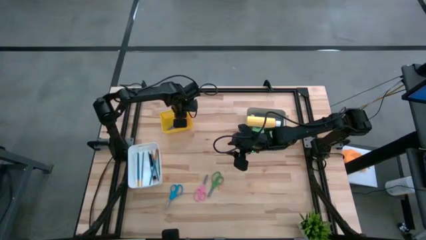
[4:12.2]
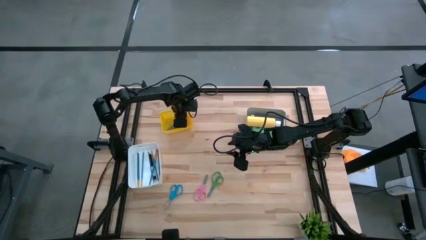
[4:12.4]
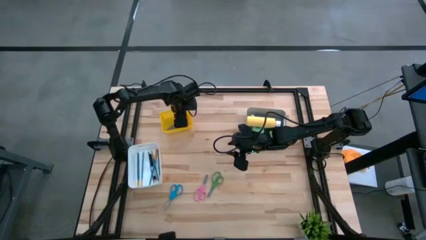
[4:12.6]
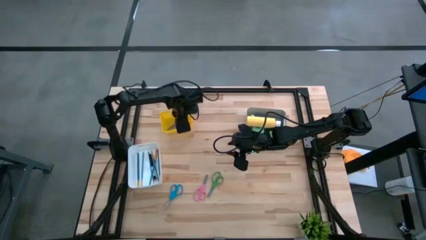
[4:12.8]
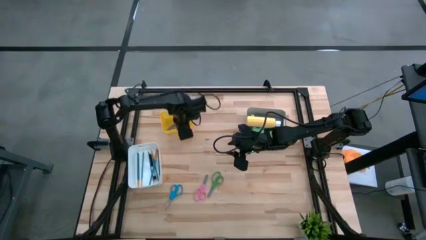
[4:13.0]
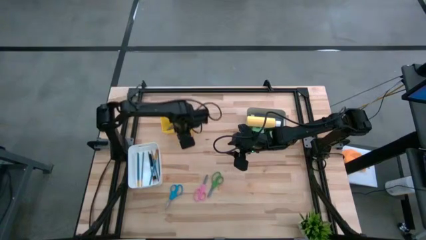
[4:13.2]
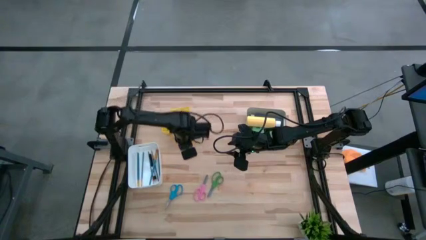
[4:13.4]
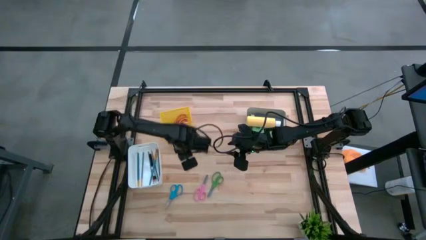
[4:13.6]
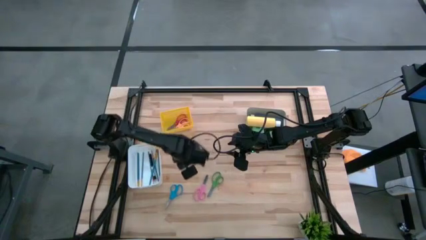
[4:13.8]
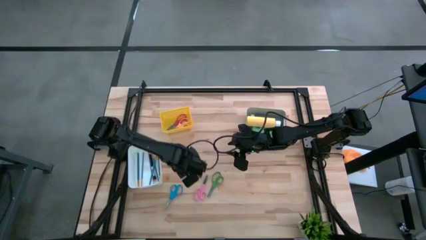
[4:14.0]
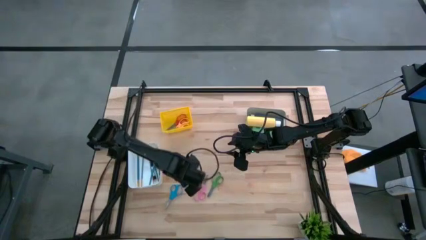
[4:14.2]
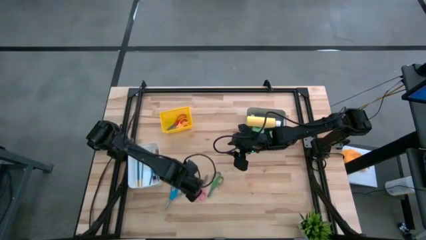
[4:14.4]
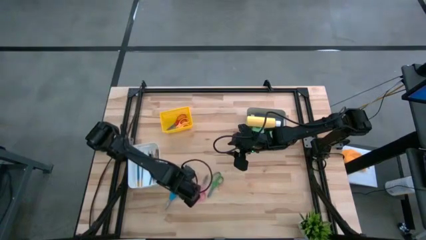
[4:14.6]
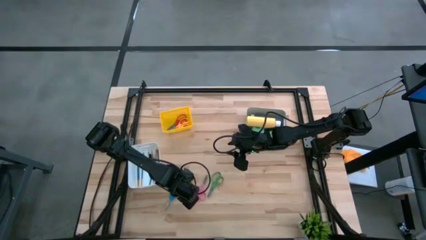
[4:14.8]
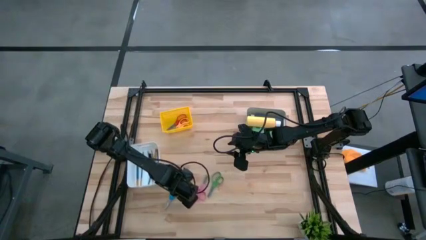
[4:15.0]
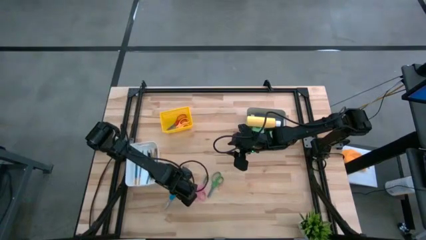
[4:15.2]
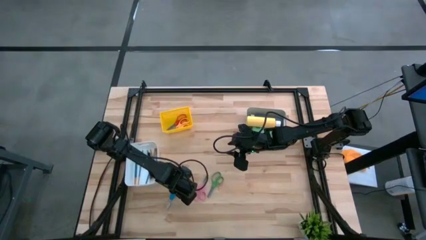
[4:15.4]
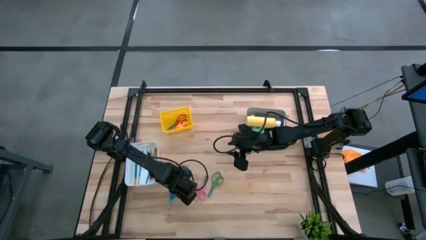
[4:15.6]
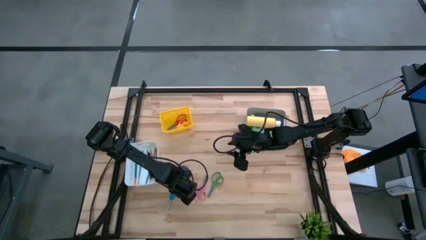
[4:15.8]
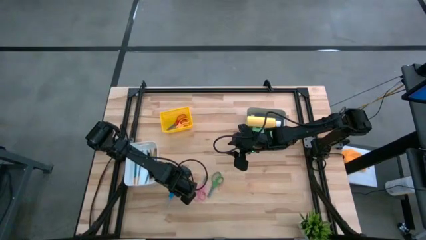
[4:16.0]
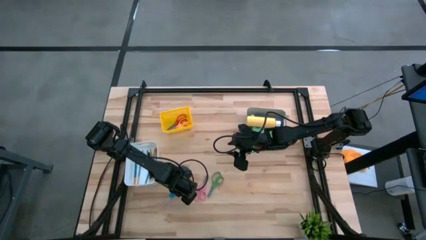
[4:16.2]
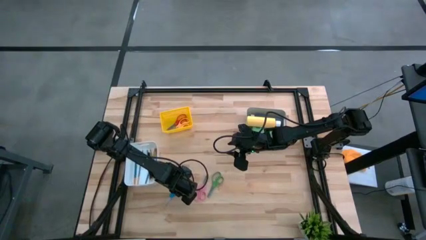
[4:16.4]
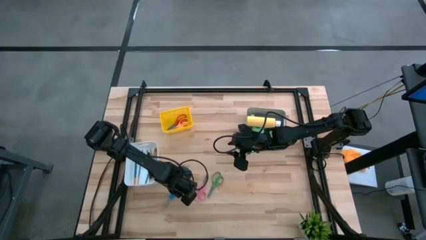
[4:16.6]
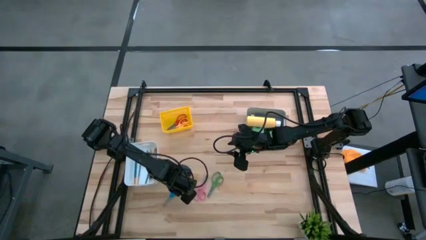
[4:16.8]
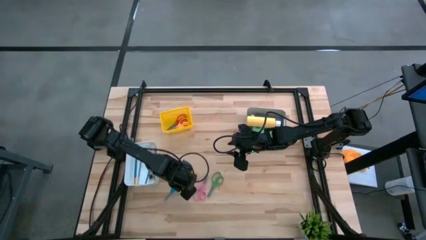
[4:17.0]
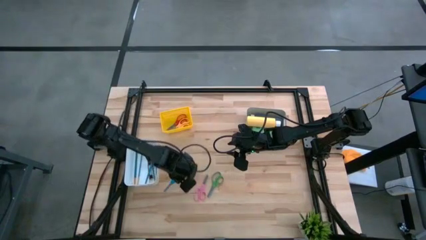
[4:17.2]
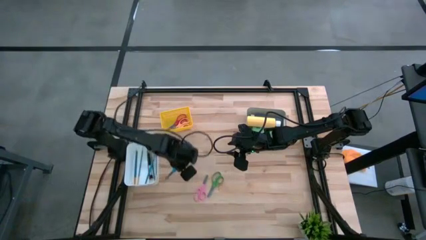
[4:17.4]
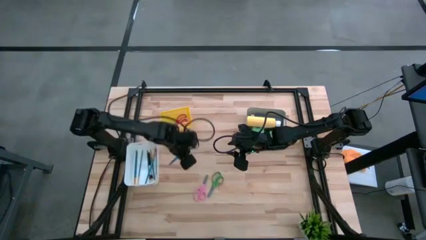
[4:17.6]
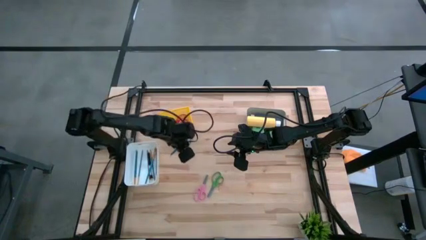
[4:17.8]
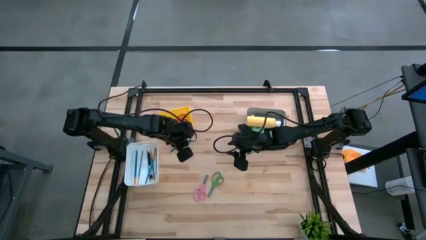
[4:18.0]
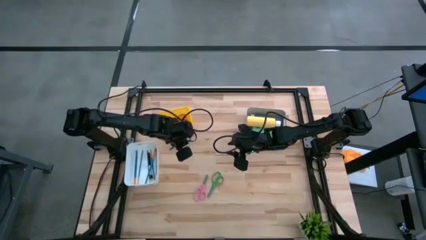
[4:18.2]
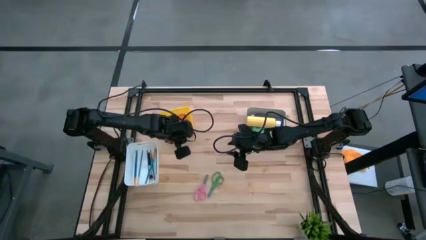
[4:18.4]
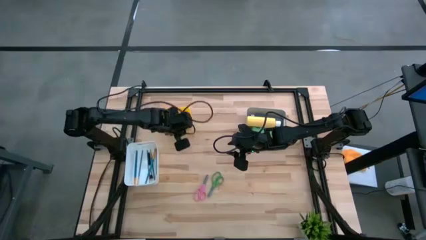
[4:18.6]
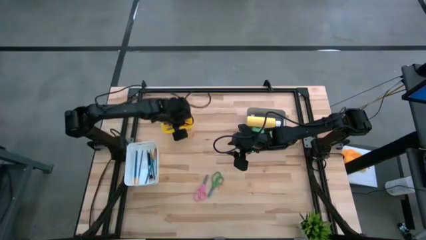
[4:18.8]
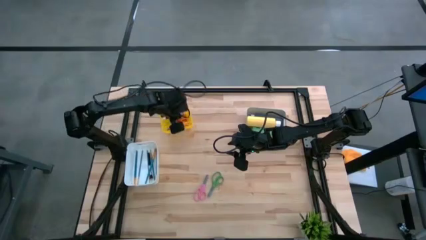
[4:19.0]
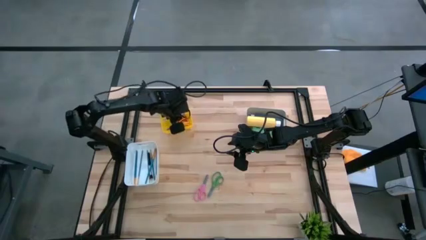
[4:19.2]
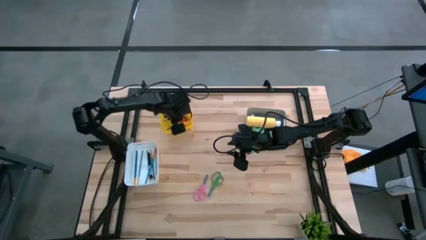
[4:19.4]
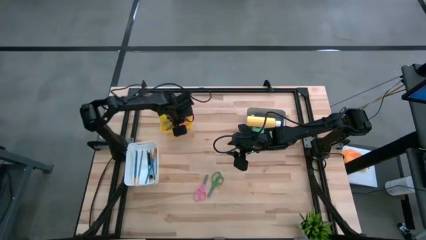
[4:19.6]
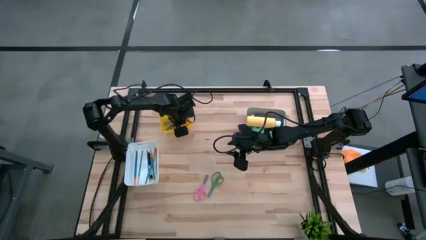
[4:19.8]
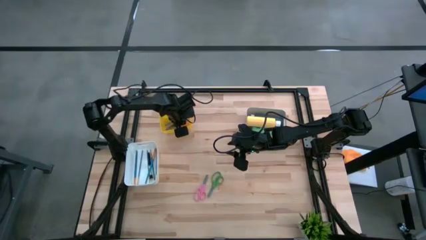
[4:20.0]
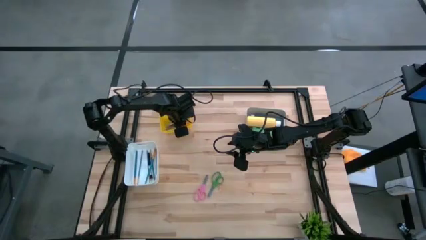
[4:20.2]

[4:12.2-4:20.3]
Task: Pick & Place Paint Supplies
Put the blue scissors into the yellow bin

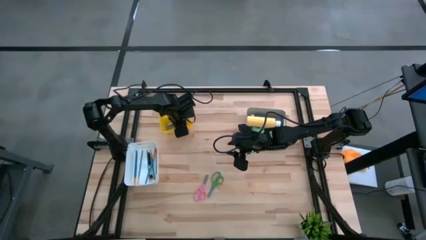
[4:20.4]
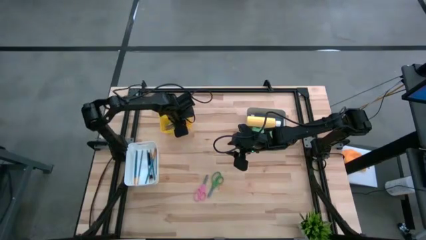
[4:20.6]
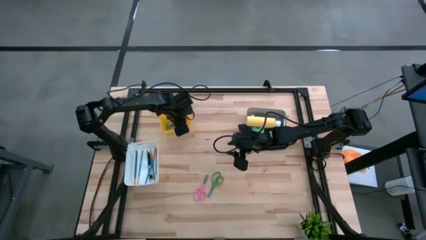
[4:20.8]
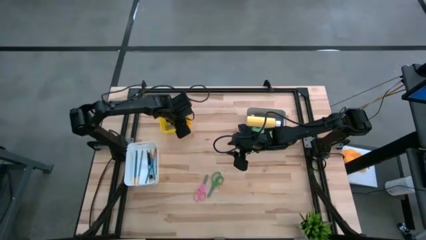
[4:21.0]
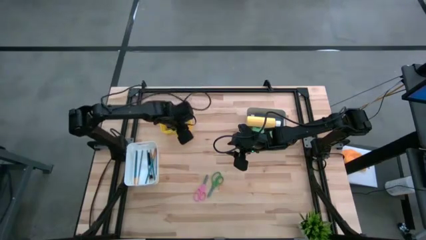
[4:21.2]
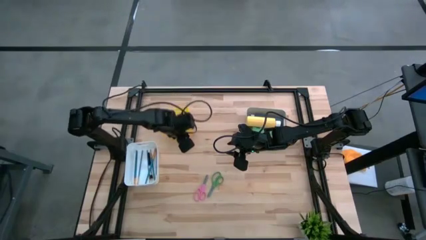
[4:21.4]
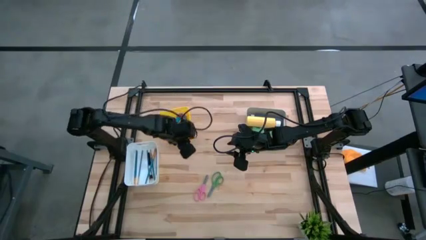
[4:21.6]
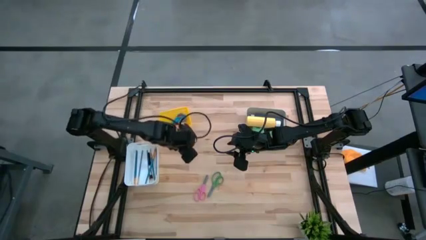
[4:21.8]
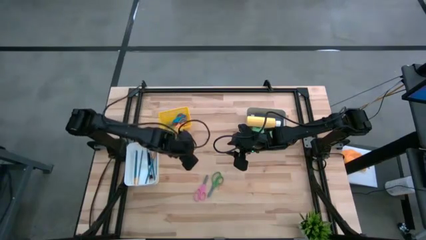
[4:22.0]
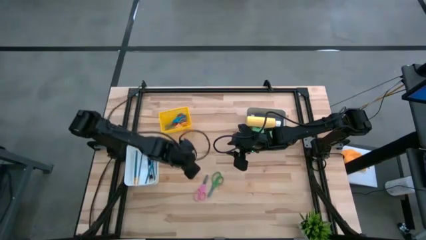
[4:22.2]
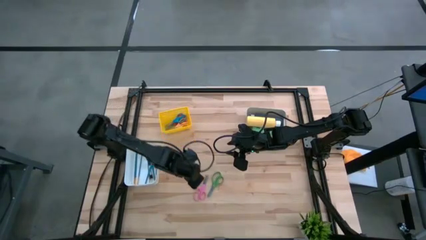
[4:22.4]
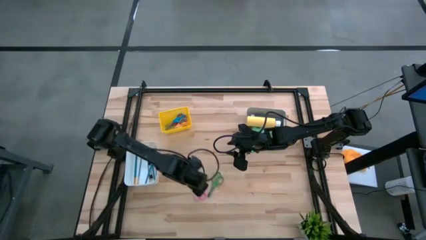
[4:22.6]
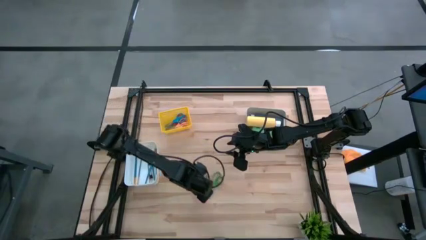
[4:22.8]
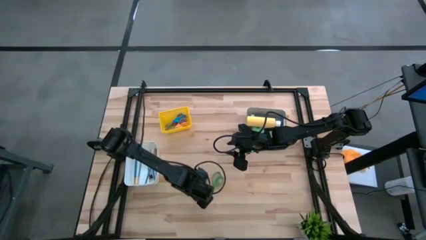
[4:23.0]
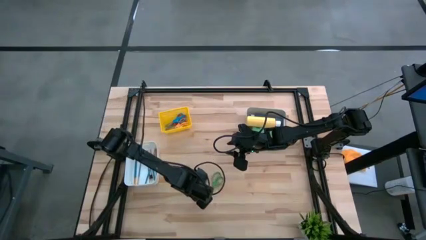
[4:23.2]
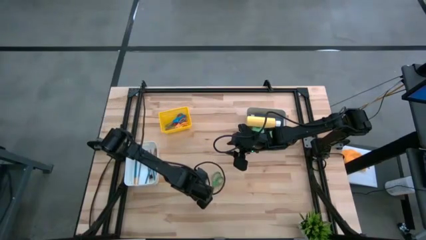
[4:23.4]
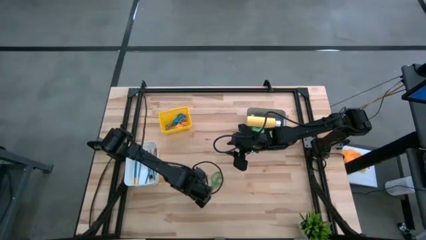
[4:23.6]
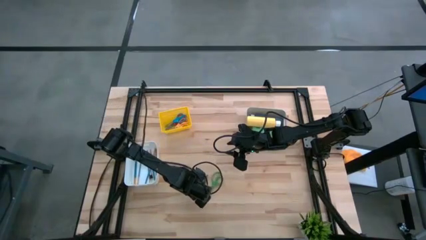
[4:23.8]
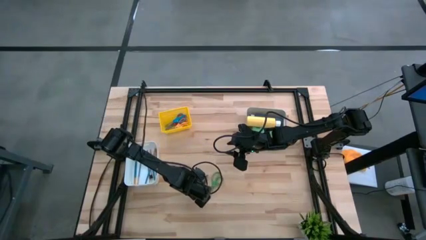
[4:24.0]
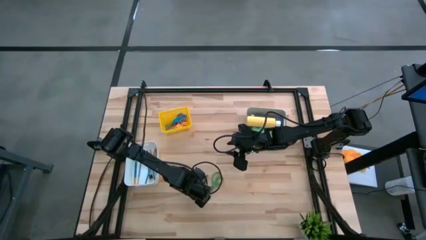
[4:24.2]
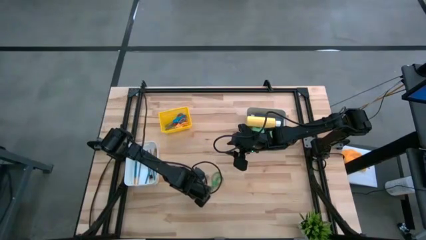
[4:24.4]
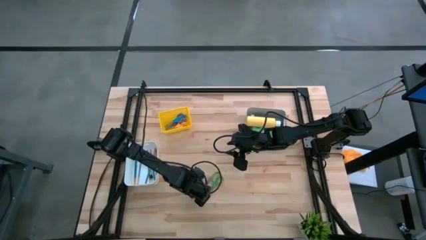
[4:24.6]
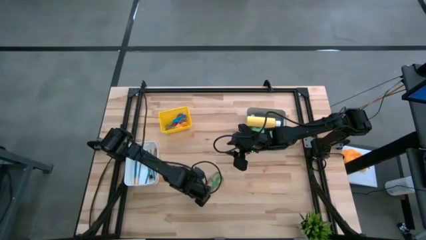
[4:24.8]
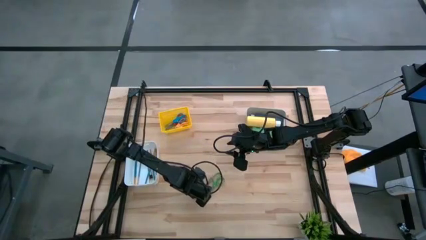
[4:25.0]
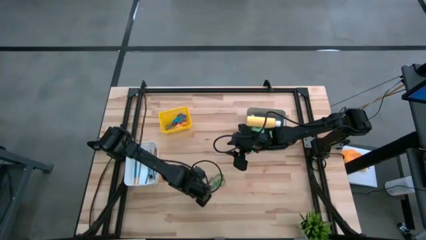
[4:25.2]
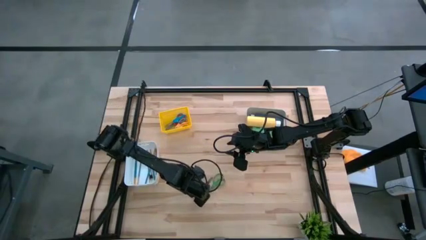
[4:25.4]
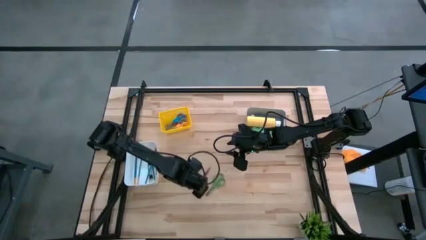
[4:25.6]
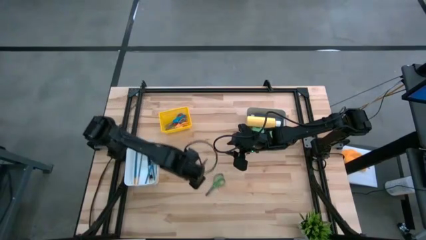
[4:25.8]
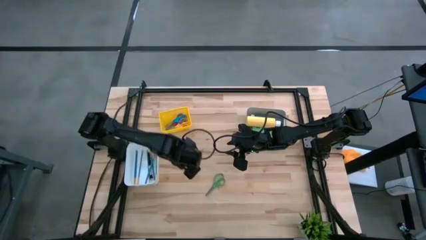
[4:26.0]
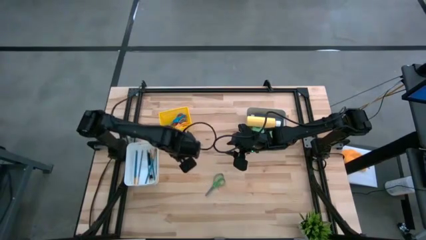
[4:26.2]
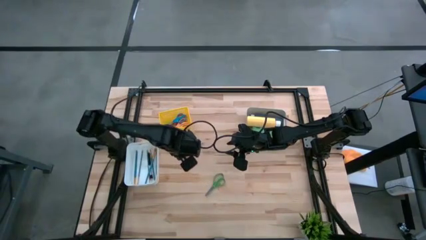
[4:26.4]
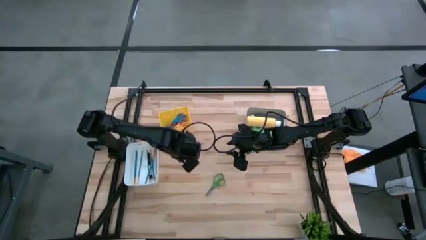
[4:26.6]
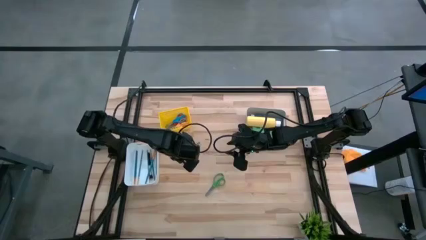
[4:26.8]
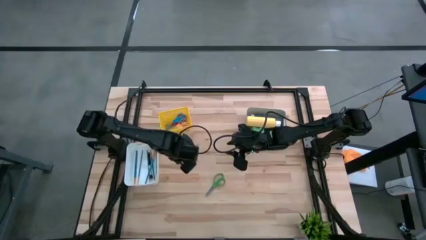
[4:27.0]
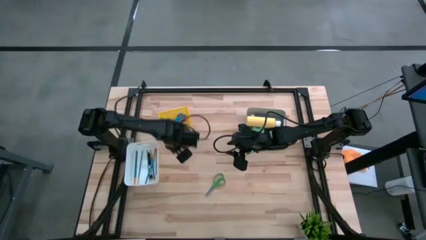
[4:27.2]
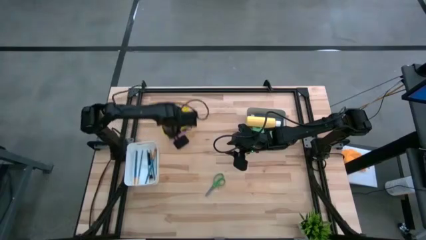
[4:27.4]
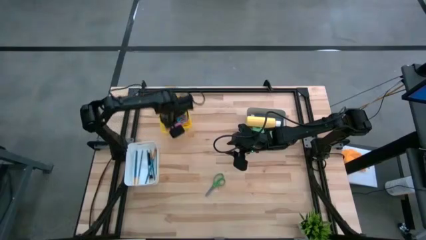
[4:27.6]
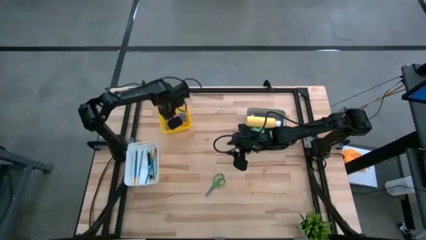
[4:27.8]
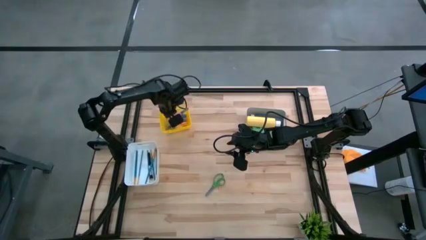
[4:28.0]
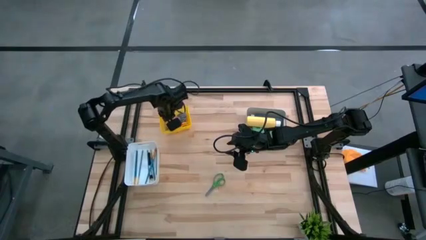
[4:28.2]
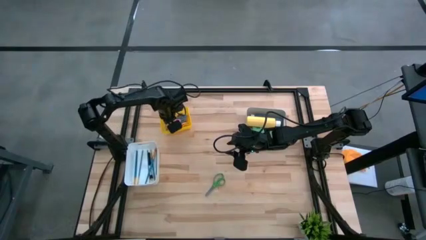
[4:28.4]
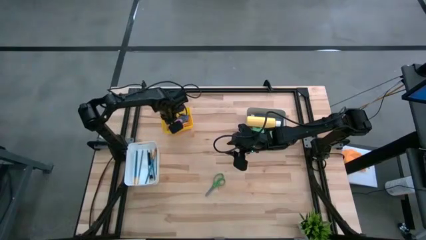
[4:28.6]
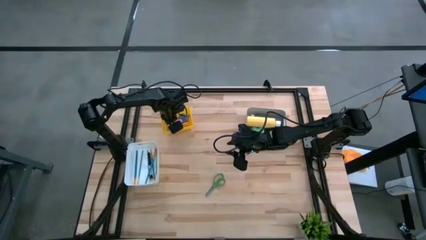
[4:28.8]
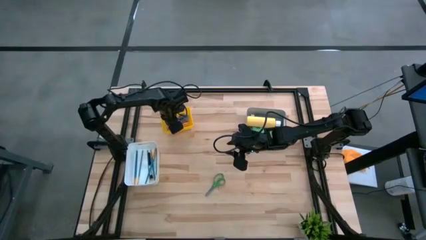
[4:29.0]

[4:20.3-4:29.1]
Put the pink scissors into the yellow bin
